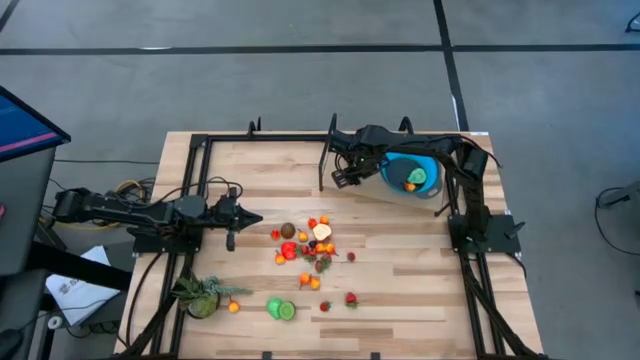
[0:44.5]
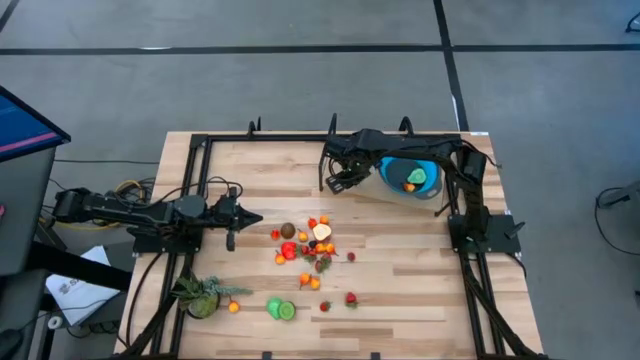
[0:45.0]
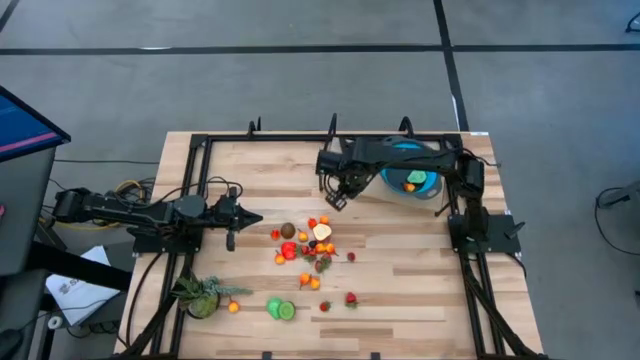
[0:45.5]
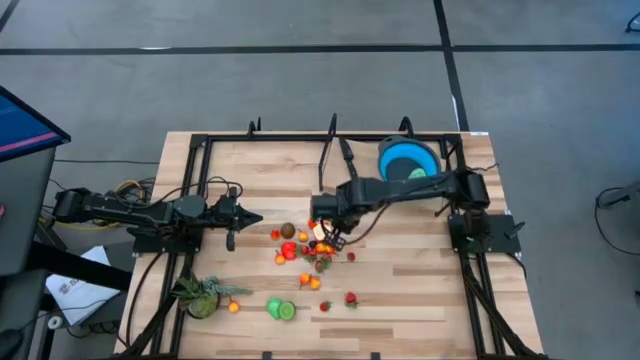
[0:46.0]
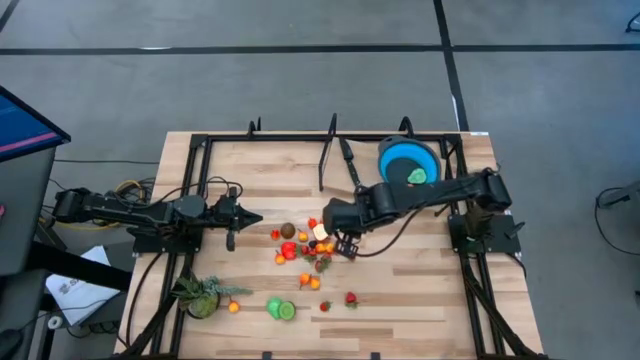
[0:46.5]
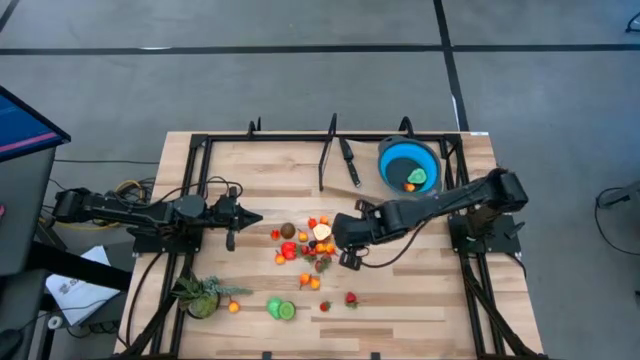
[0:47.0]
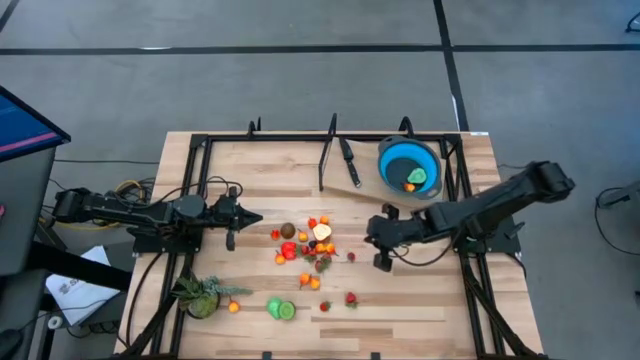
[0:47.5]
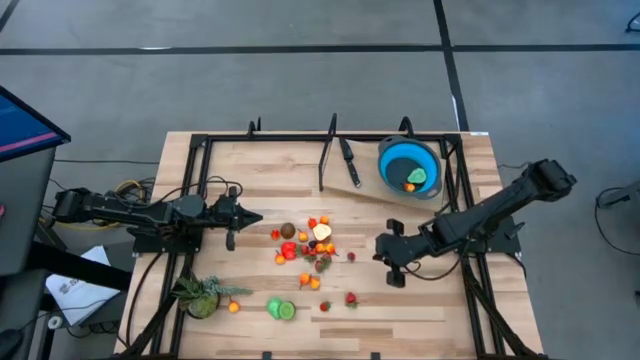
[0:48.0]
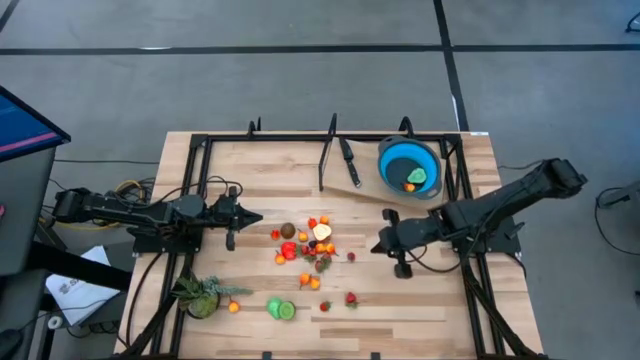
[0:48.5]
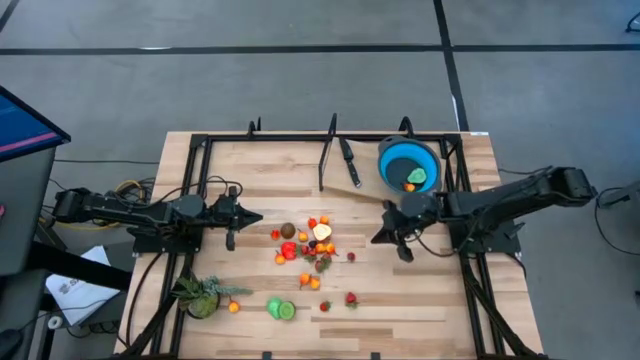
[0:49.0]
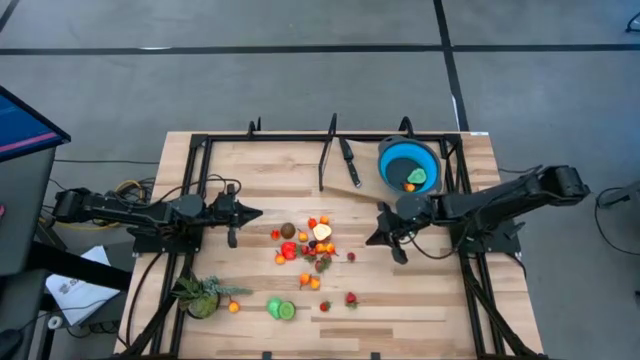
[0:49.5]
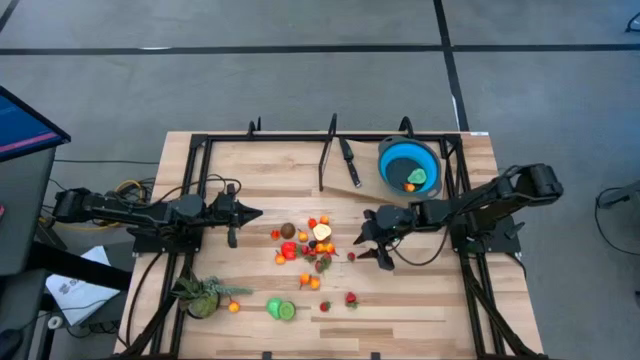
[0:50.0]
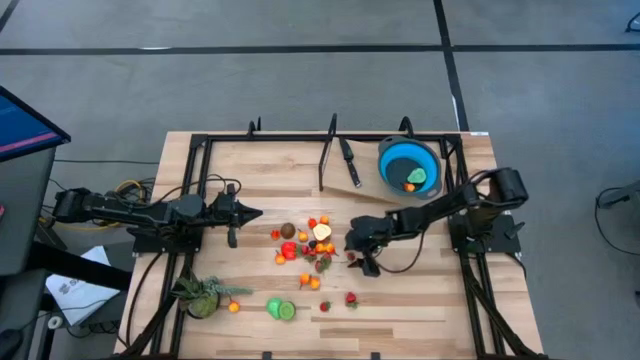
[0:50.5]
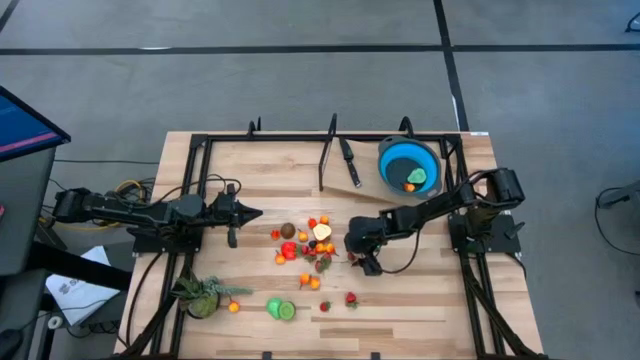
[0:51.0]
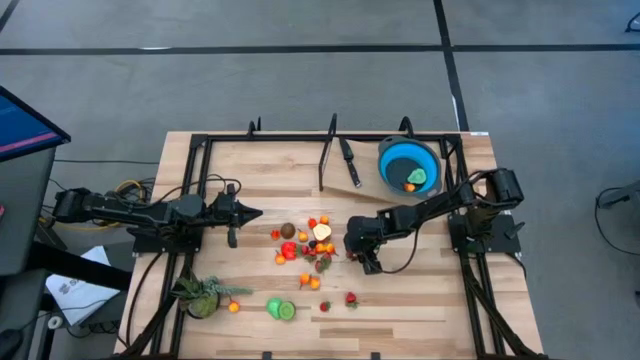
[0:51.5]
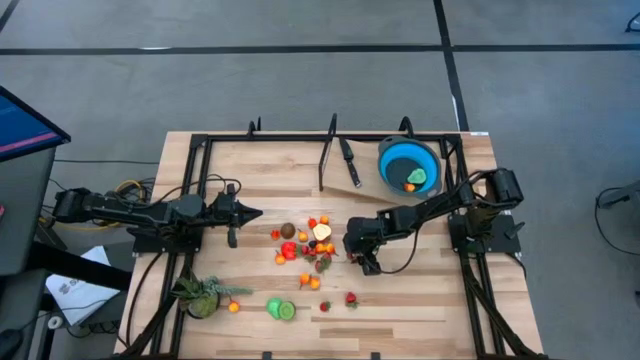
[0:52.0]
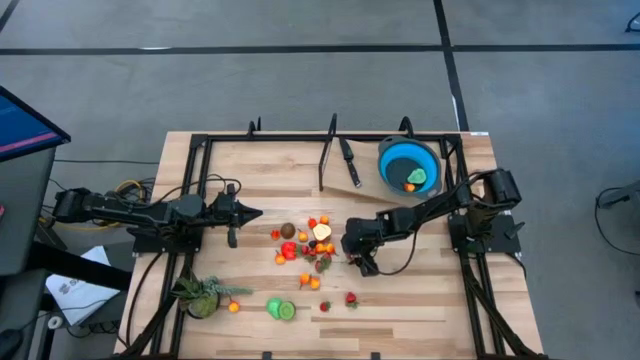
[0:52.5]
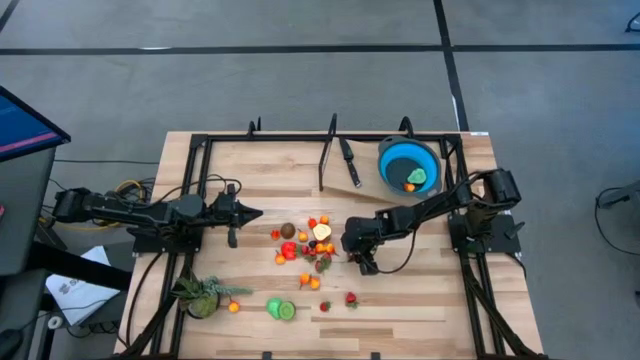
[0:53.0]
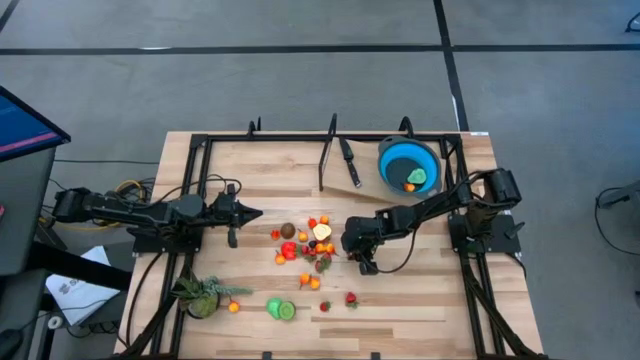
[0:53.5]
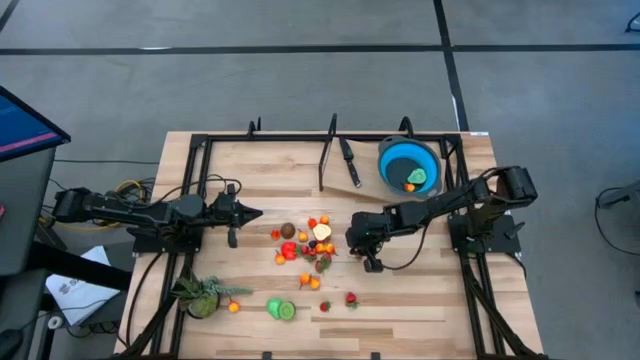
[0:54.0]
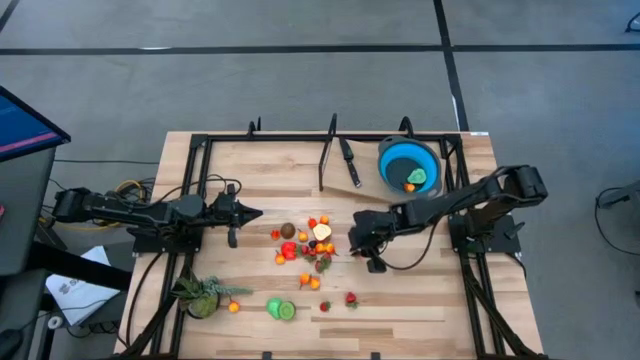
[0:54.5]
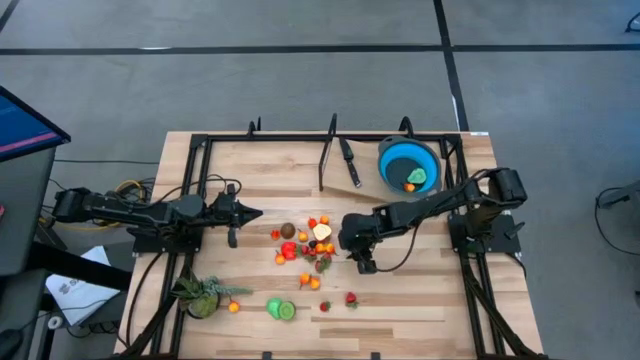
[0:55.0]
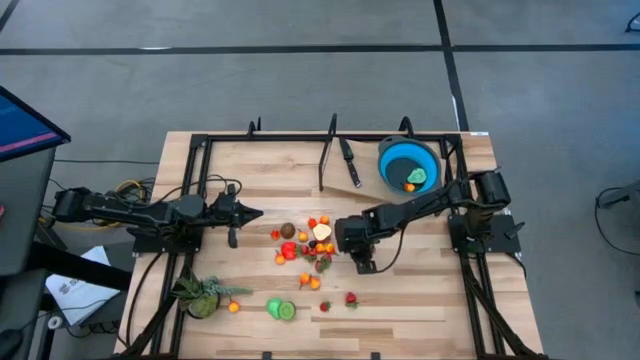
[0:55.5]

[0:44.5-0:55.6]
Task: Pick & Place Fruit
Put the red strawberry into the blue colander

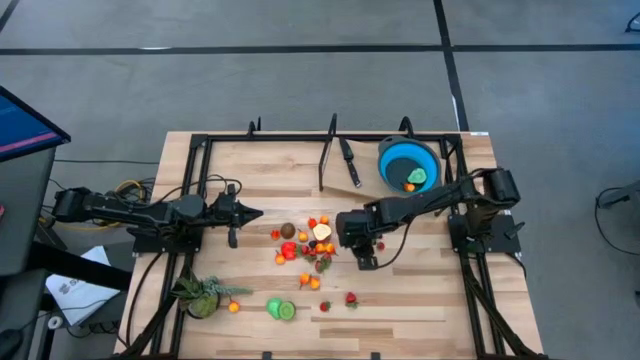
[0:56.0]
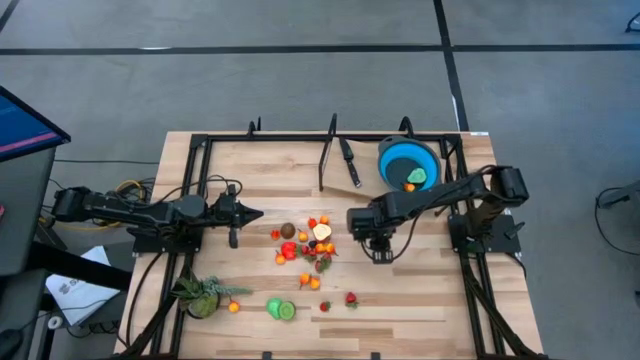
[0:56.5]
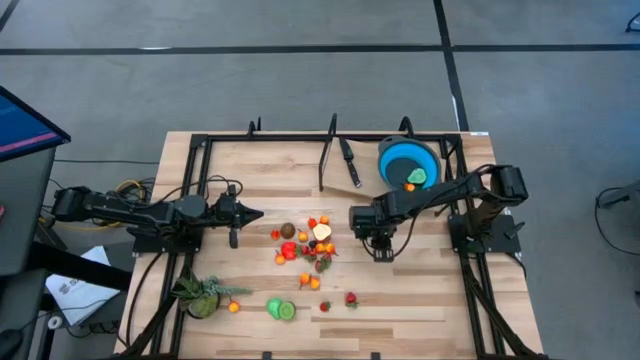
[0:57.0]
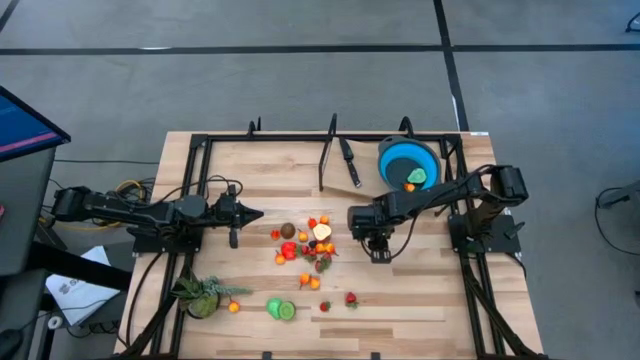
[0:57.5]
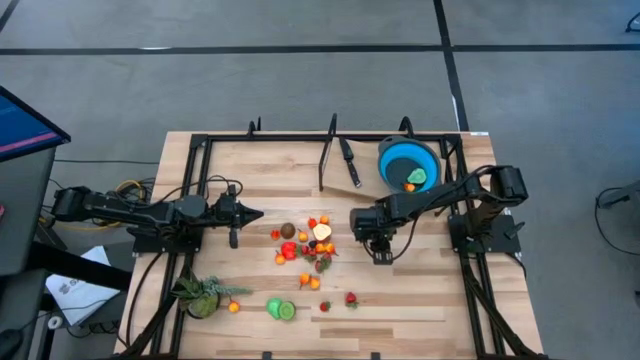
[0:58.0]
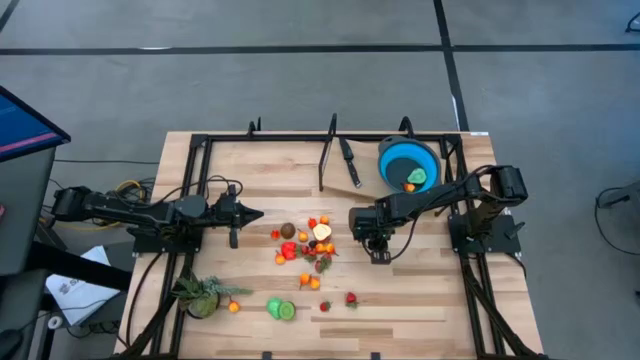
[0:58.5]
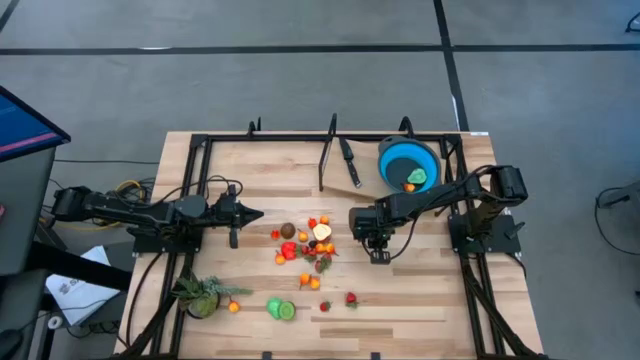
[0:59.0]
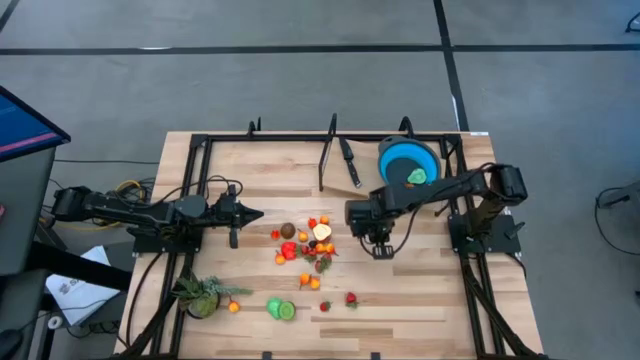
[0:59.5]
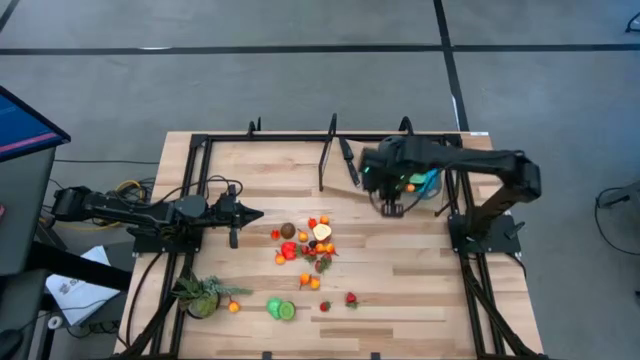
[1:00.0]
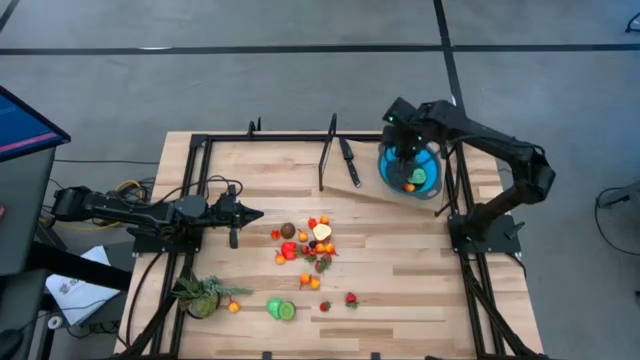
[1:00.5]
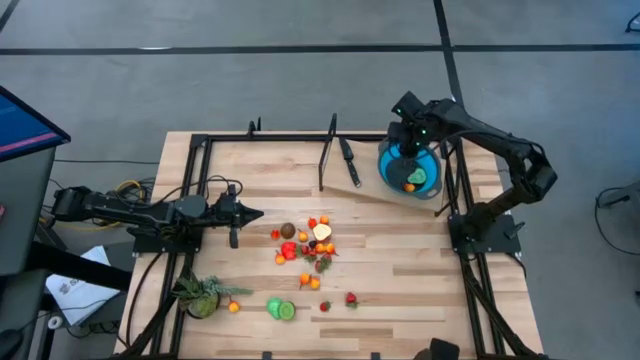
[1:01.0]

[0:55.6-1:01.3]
Put the red strawberry into the blue colander

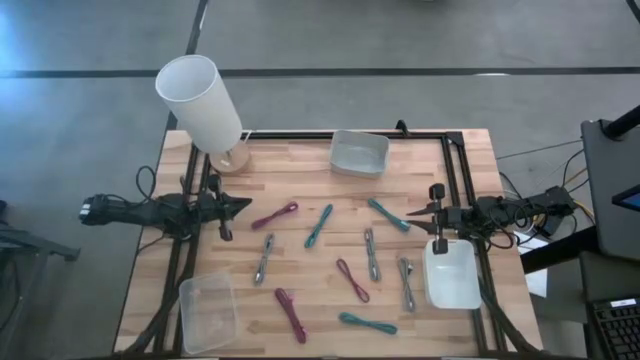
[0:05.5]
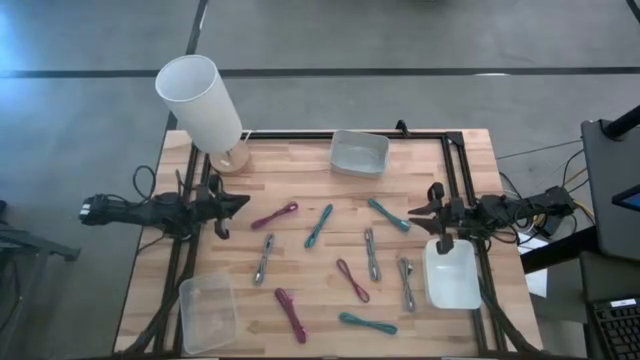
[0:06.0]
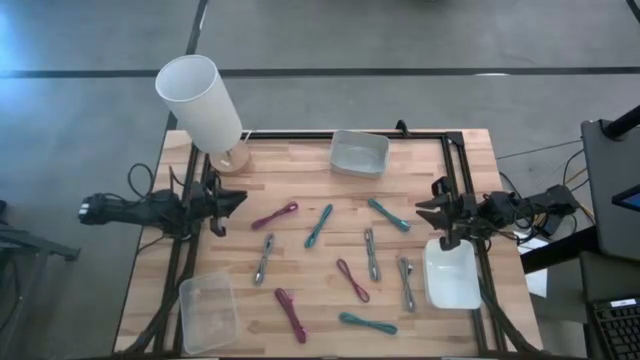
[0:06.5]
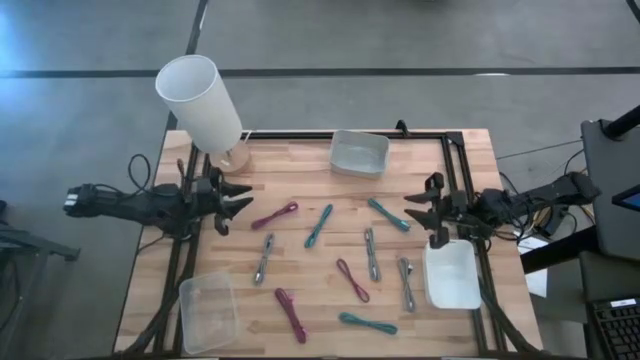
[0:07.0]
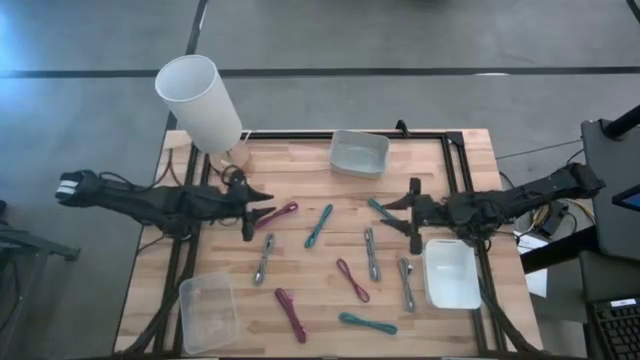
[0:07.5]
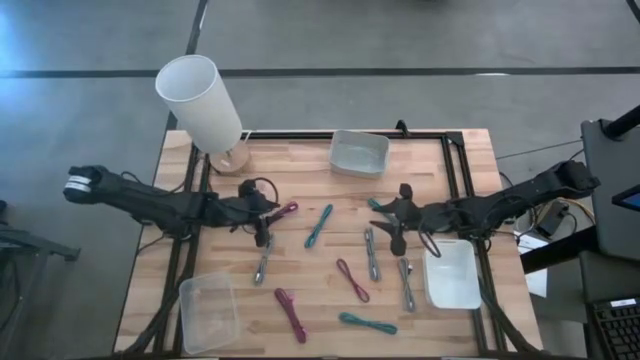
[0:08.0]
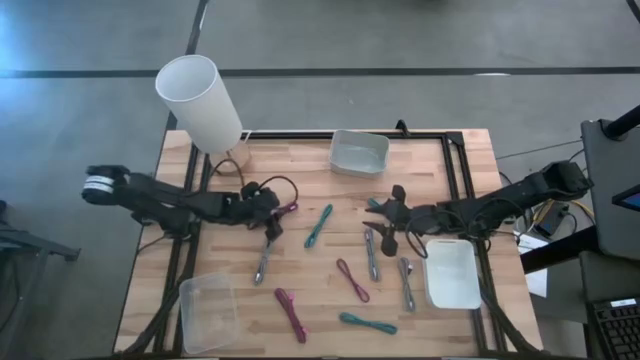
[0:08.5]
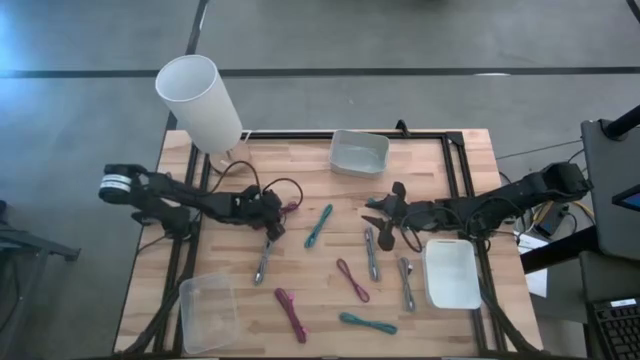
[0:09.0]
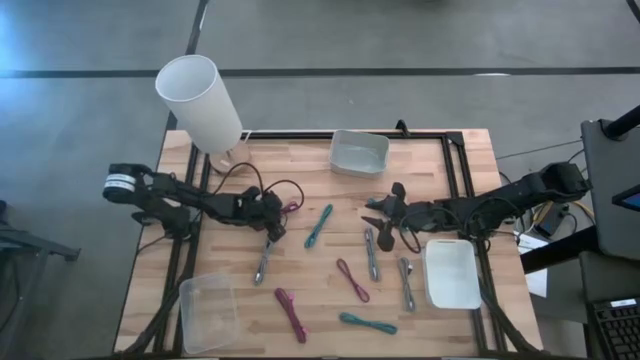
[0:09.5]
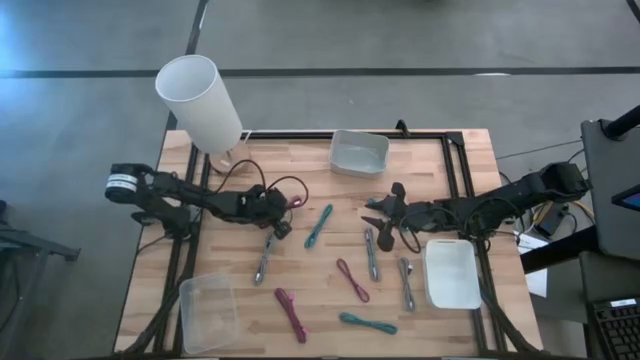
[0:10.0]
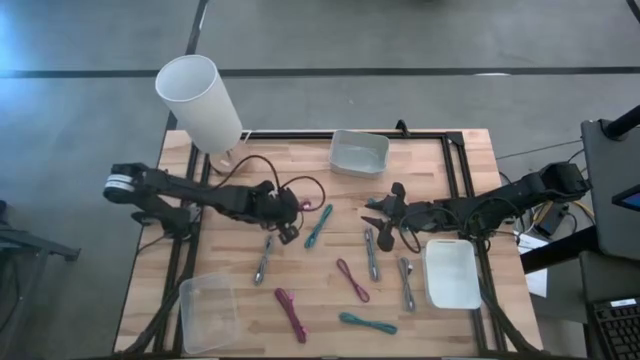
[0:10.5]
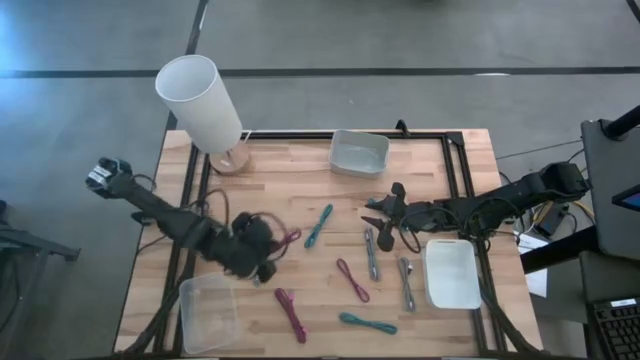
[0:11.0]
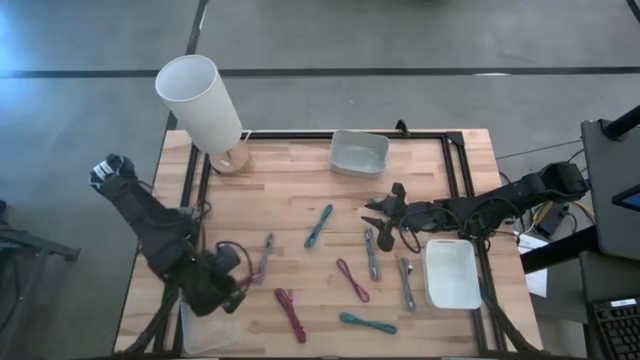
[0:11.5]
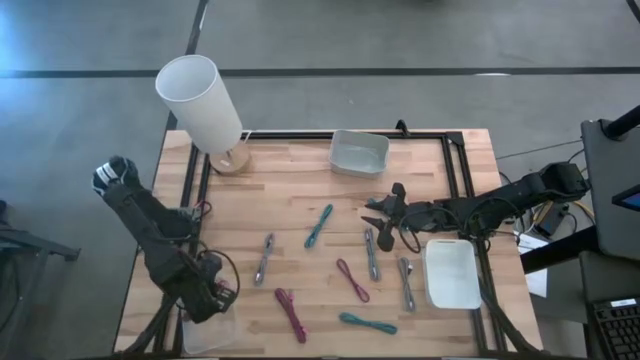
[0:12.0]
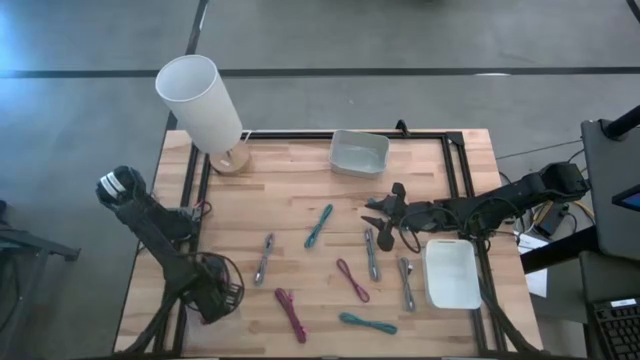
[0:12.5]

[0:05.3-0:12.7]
Task: Pick & Place USB Port
Put the top pink striped charger cable into the transparent bin
